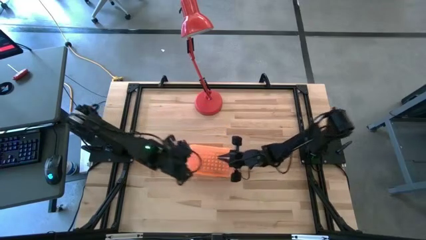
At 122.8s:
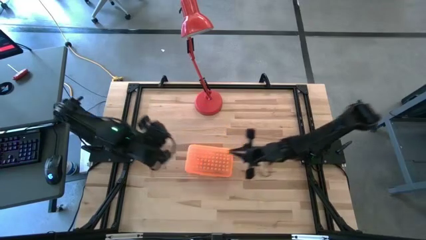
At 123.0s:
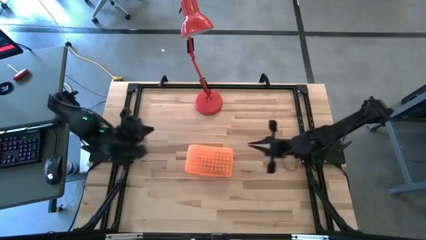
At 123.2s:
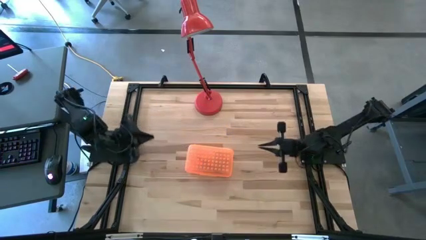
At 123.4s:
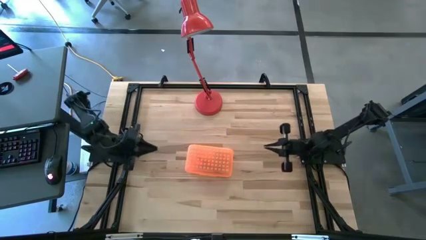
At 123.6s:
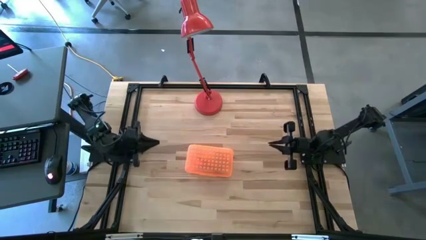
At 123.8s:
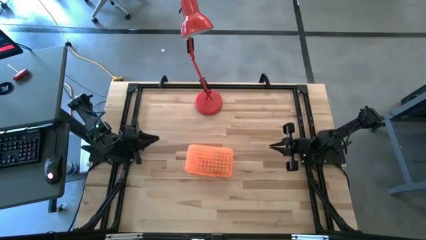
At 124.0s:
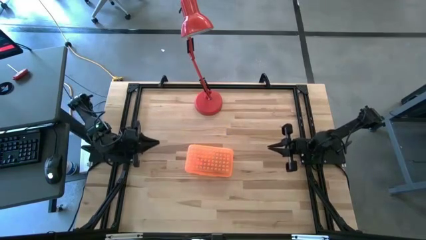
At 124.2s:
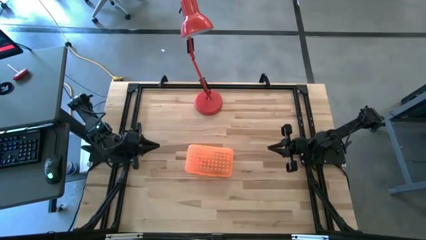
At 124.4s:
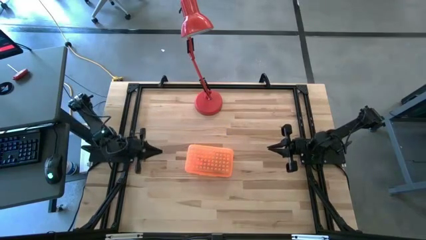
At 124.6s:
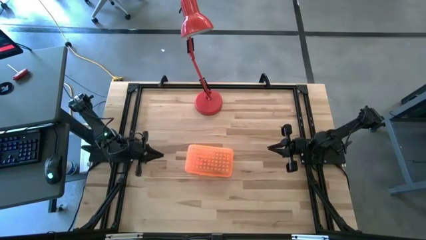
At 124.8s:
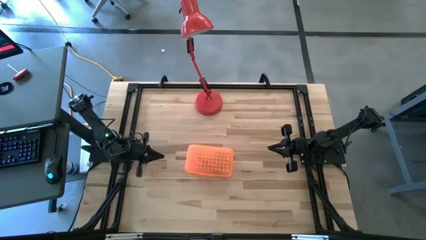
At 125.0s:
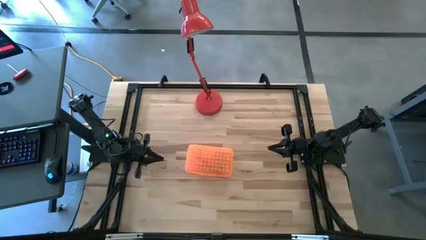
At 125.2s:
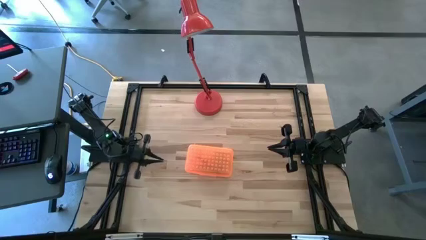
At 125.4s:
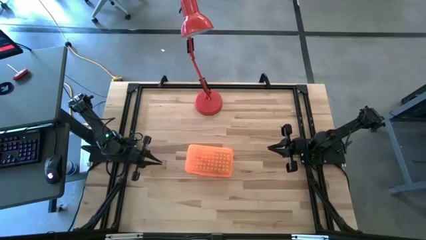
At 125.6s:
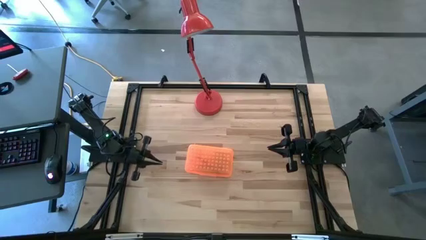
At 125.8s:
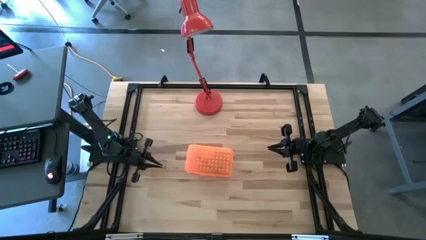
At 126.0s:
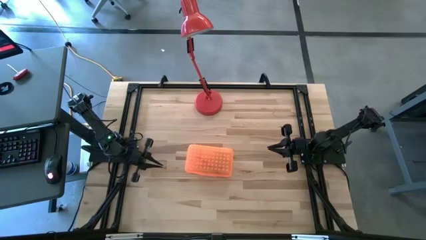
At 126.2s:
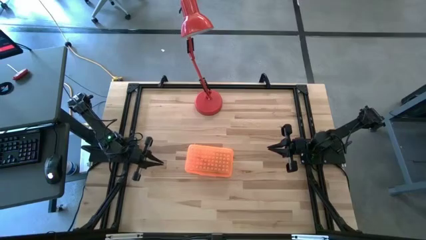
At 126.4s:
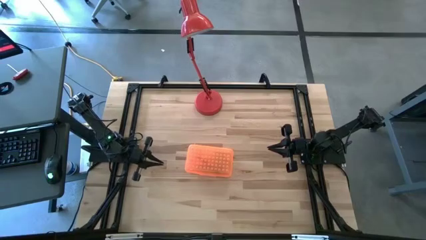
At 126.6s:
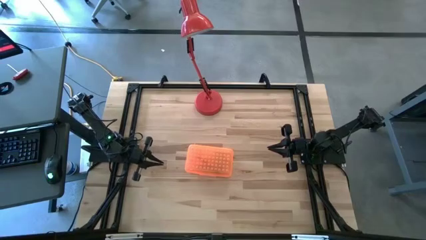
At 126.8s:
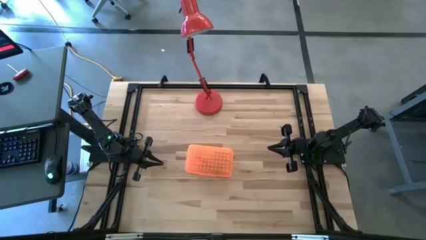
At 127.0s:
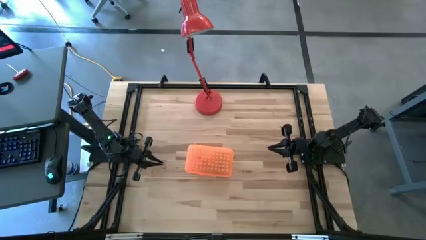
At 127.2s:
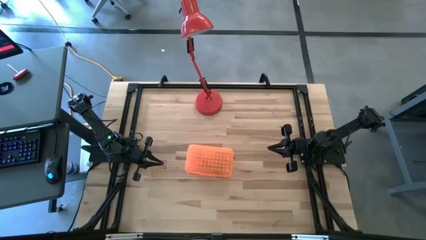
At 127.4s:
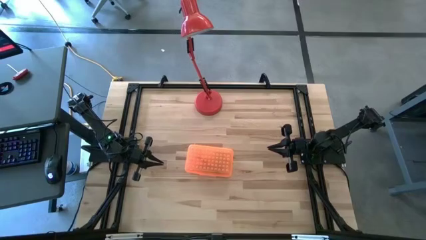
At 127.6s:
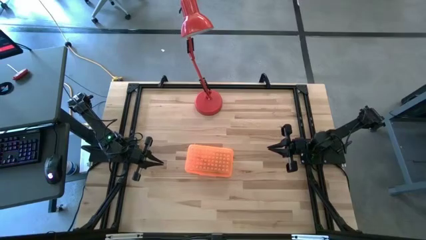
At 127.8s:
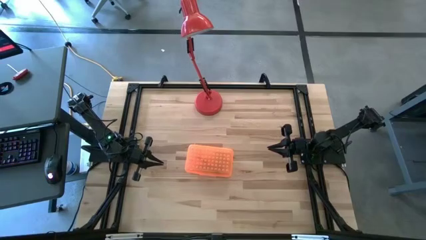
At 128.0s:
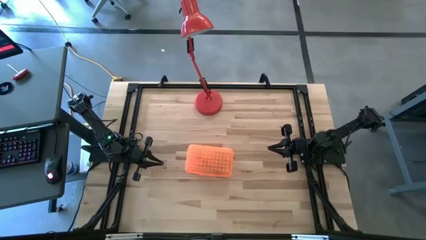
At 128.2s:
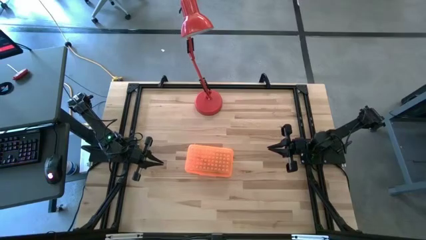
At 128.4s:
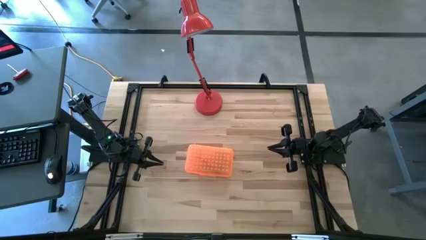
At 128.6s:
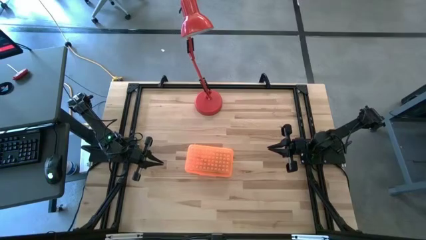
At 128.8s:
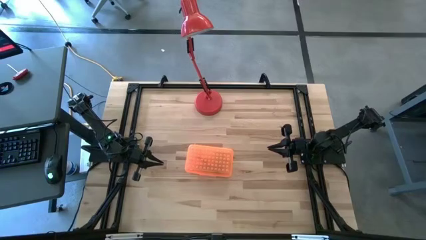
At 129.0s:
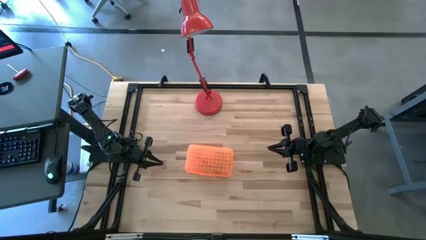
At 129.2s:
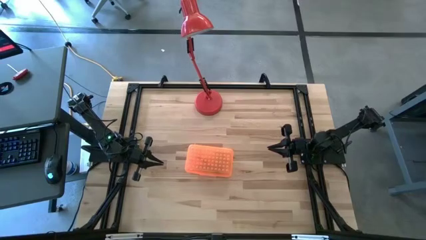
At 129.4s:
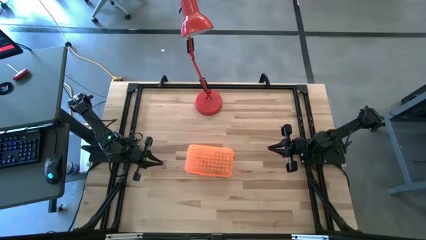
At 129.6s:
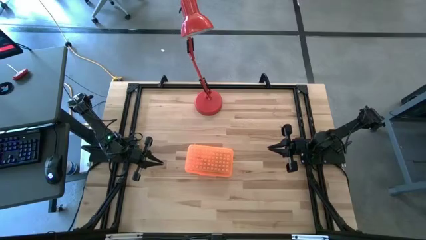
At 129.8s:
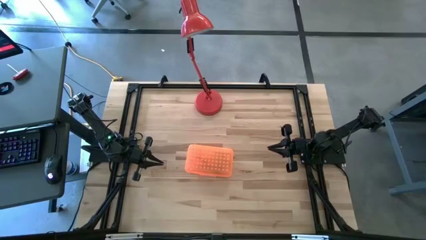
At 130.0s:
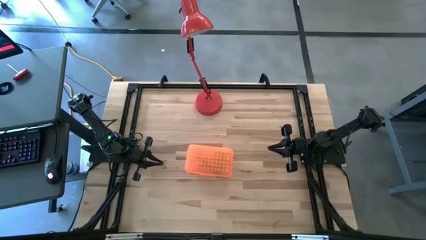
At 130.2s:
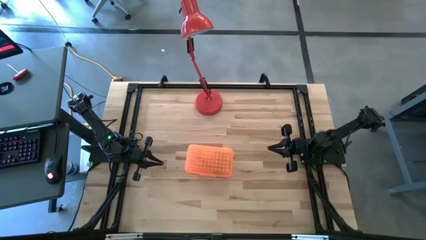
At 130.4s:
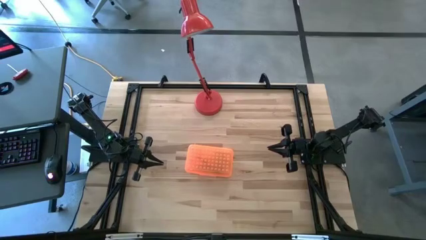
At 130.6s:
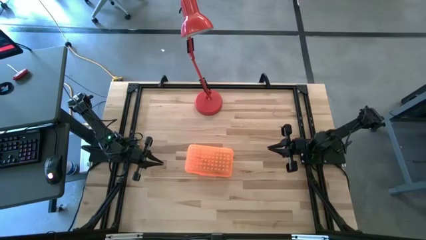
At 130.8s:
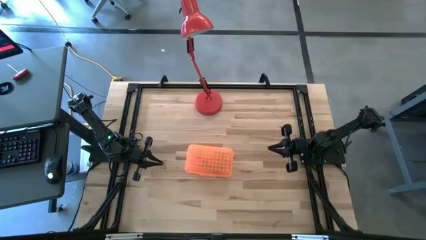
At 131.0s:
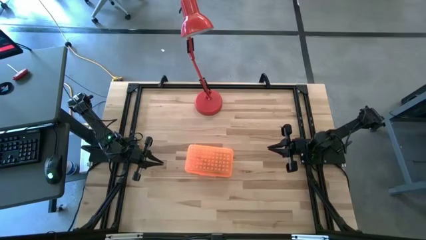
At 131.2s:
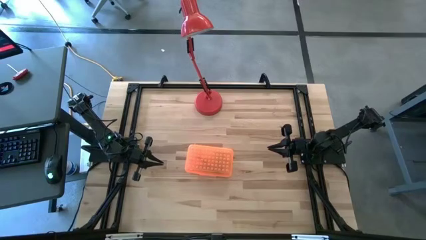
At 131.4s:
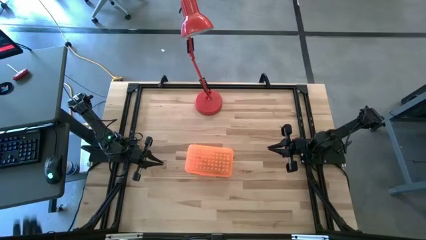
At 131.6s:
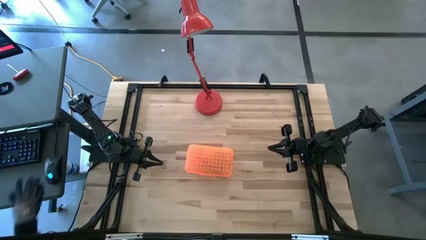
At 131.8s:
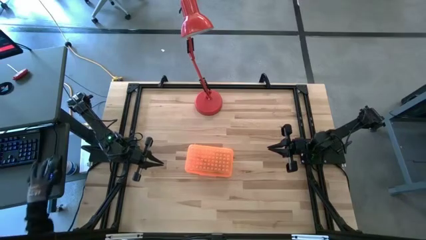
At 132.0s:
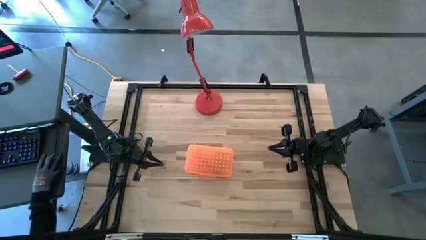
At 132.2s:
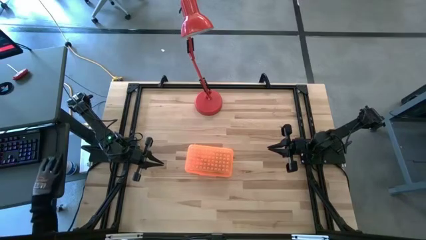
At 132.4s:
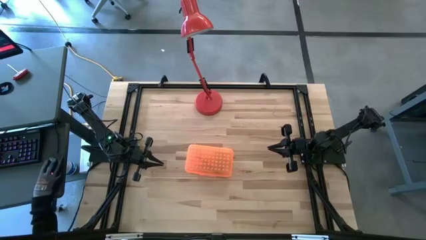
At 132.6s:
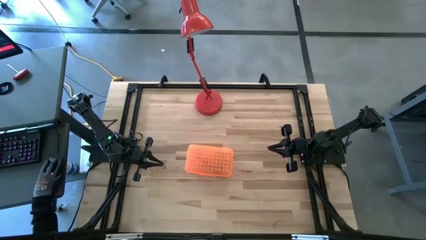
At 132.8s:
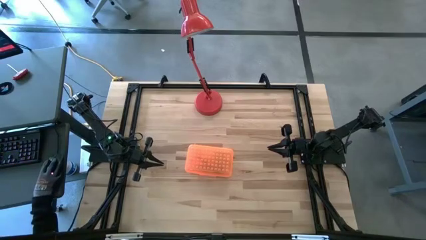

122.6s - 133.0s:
Task: Pick & place school supplies into a supply box
Return to Home Position

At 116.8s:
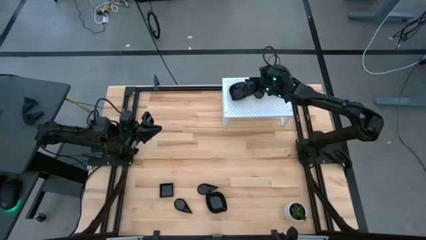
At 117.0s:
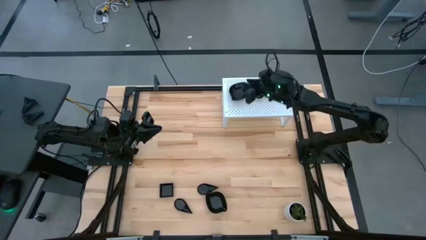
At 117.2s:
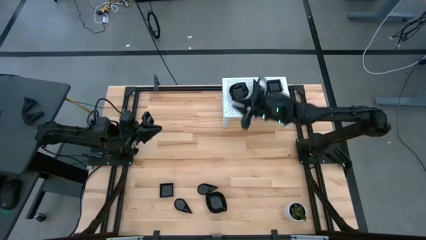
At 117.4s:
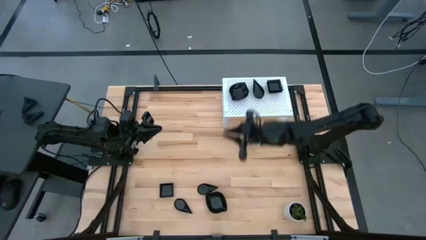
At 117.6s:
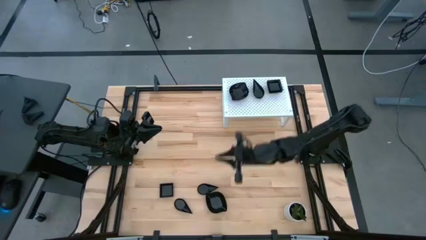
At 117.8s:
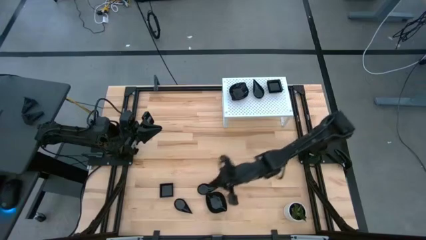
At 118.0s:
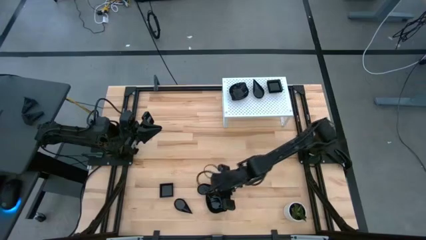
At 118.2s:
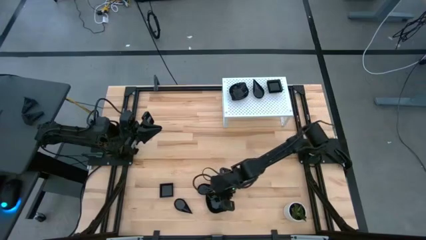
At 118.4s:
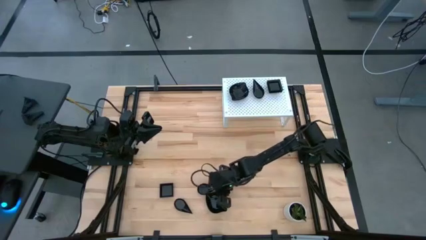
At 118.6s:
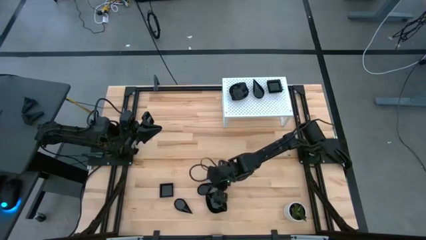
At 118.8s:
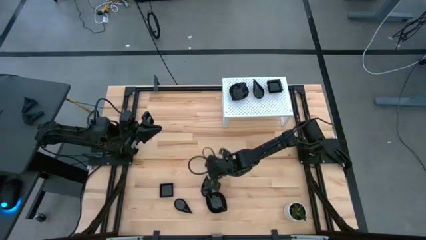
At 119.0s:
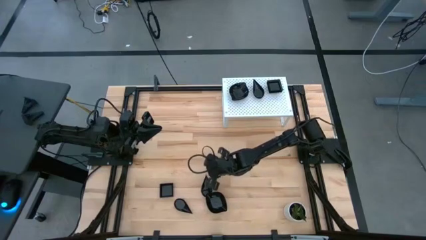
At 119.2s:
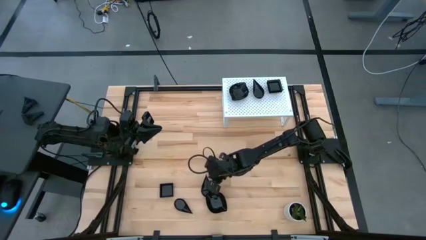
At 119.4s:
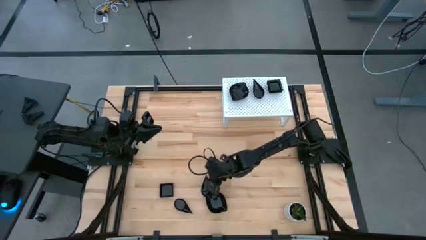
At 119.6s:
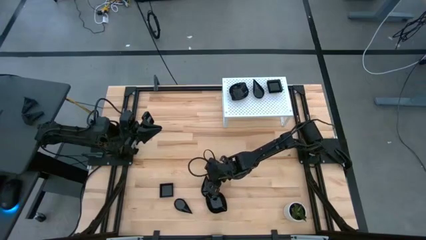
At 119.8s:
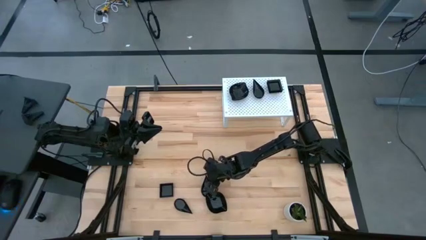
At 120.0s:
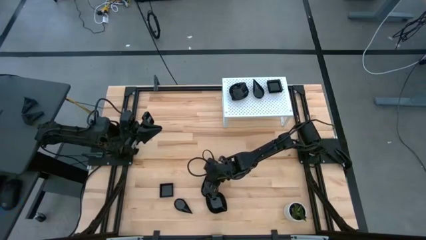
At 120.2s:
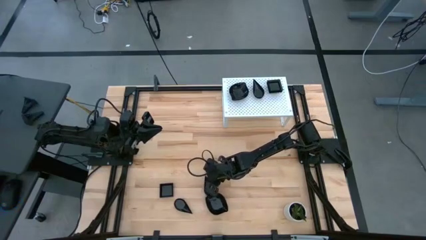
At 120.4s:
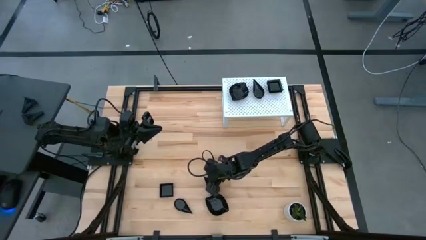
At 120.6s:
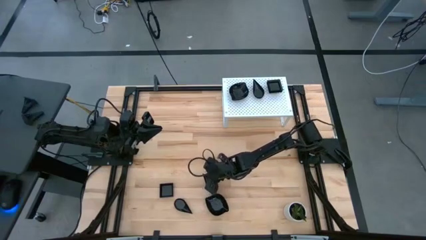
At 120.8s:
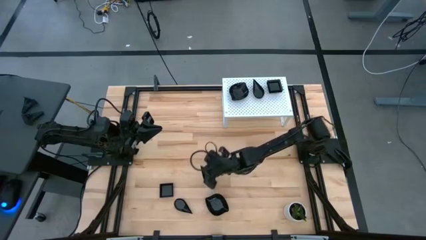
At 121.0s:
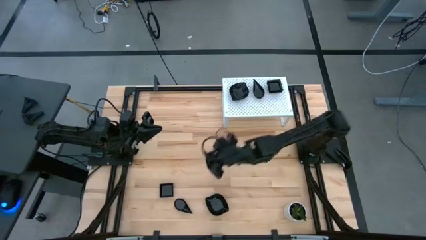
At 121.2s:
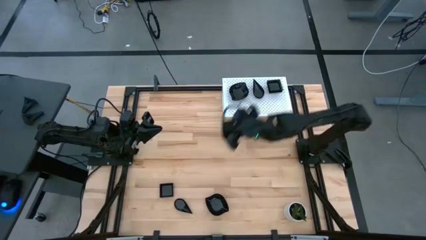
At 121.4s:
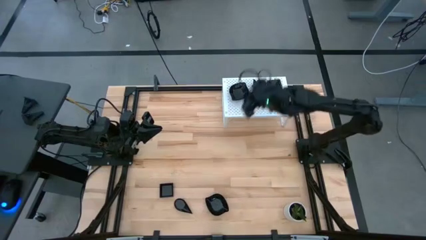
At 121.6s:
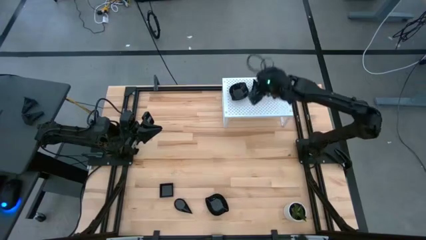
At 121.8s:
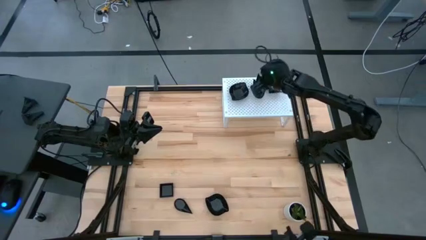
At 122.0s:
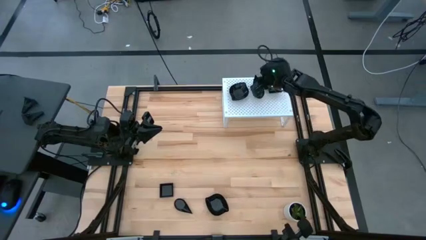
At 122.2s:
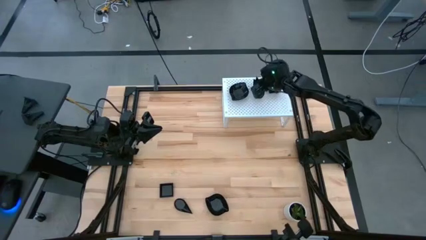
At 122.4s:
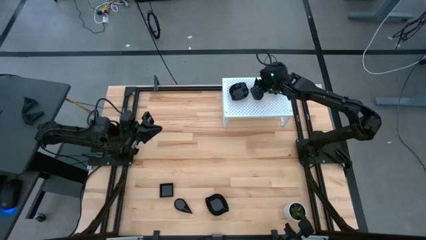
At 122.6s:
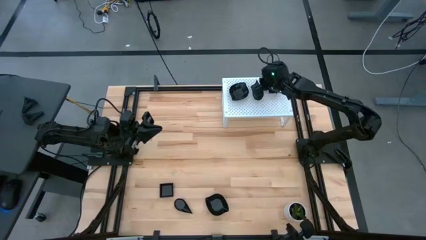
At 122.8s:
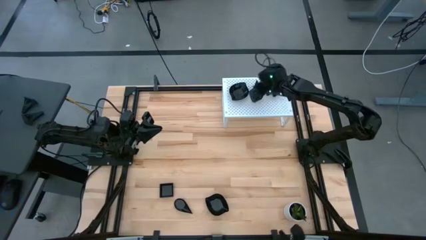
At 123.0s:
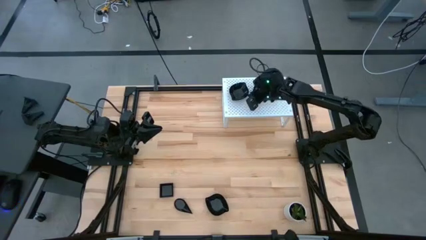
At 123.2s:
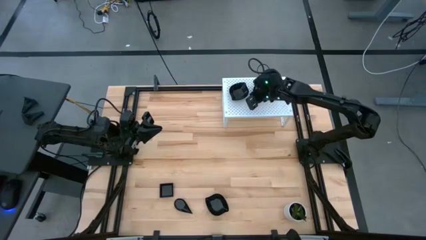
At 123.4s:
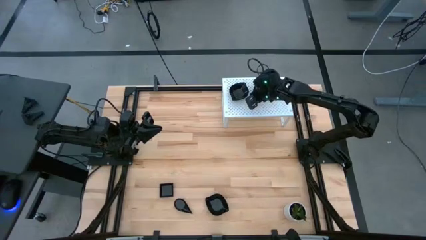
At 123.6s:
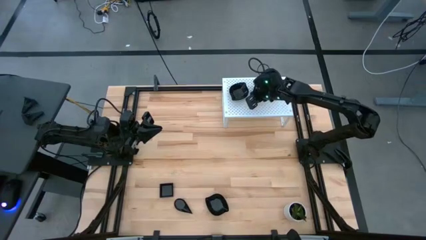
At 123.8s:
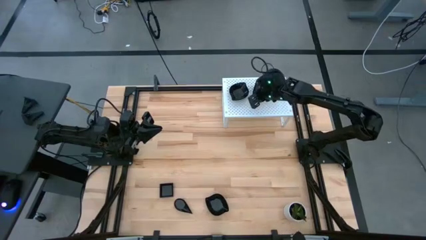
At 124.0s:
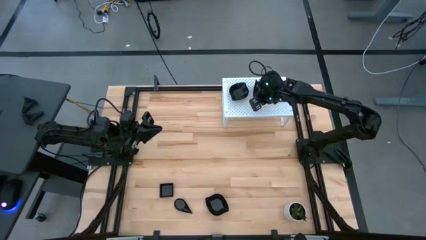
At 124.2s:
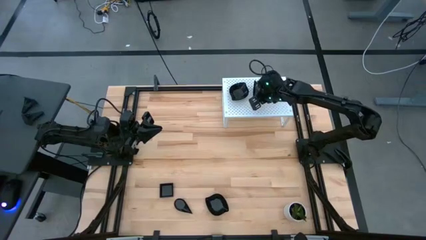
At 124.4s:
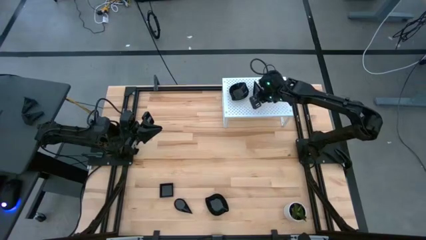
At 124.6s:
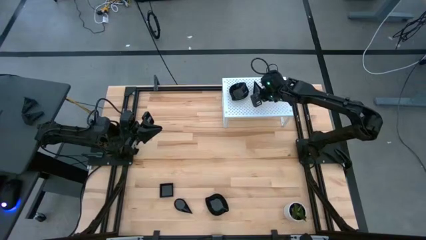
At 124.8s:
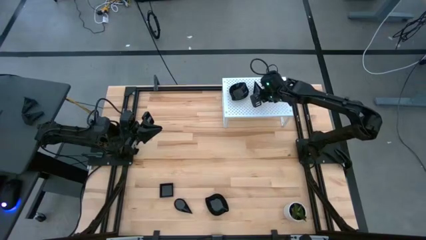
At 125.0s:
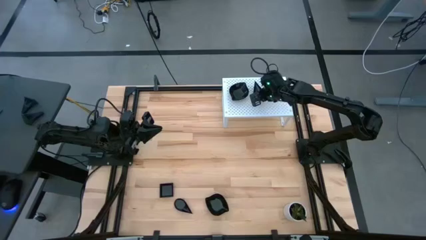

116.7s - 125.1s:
Task: Pick & Place Mini shaped plates
Stack the drop shaped plate on top of the drop shaped plates on the shelf
